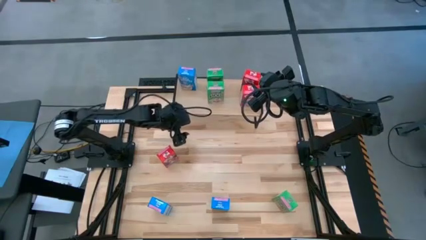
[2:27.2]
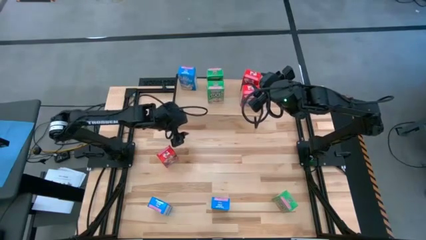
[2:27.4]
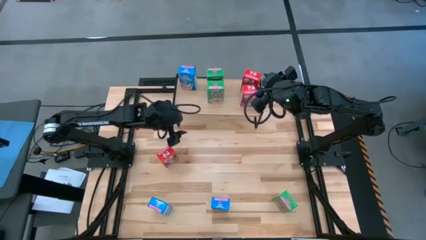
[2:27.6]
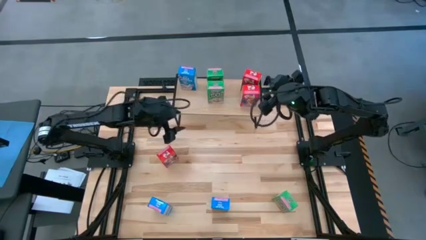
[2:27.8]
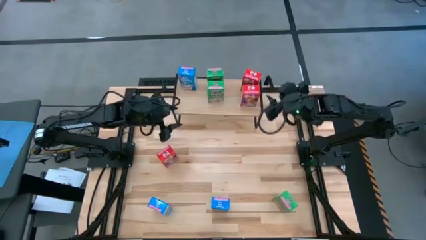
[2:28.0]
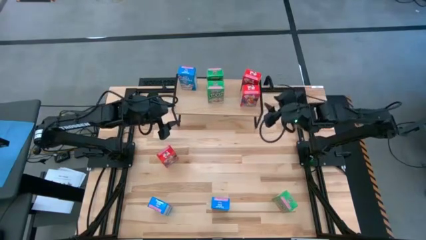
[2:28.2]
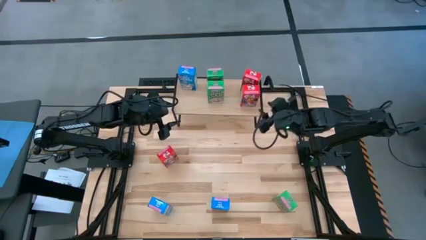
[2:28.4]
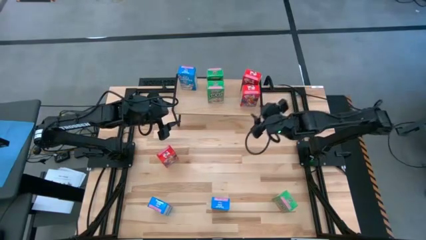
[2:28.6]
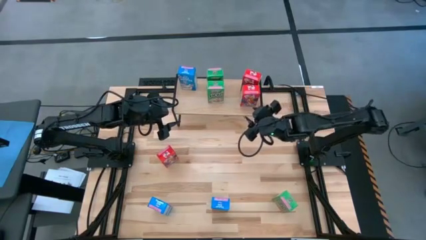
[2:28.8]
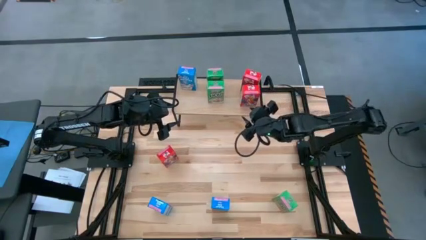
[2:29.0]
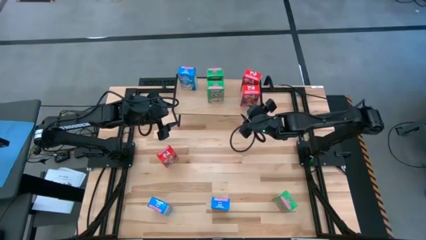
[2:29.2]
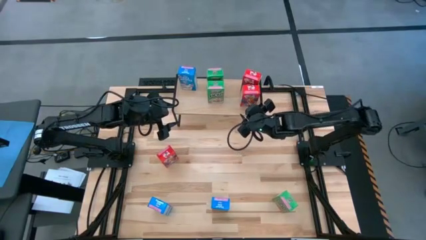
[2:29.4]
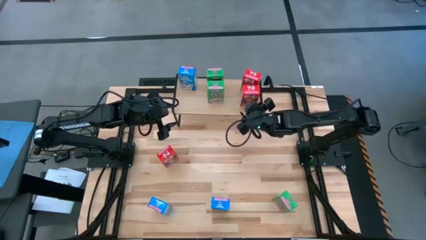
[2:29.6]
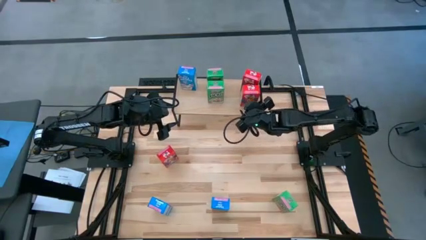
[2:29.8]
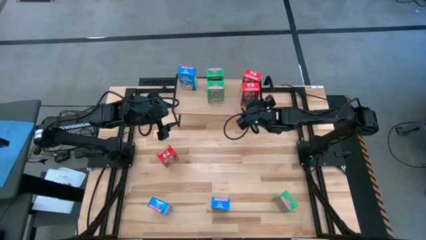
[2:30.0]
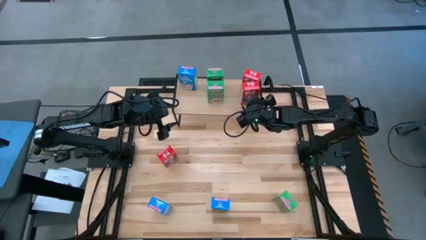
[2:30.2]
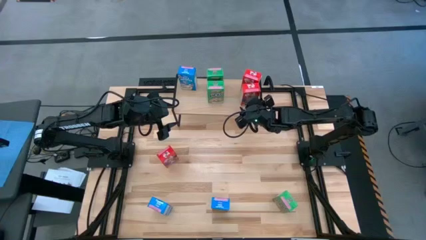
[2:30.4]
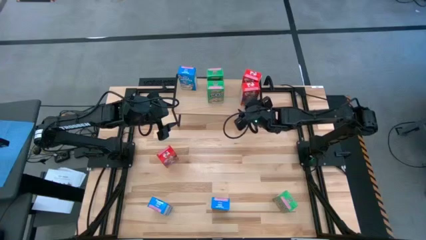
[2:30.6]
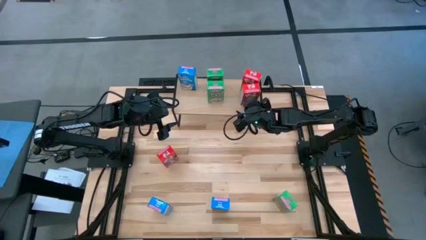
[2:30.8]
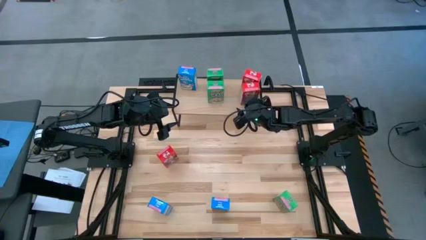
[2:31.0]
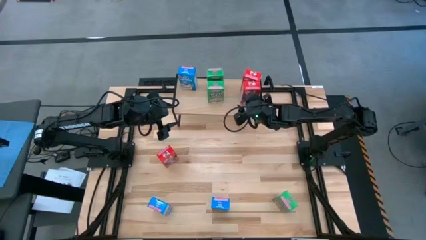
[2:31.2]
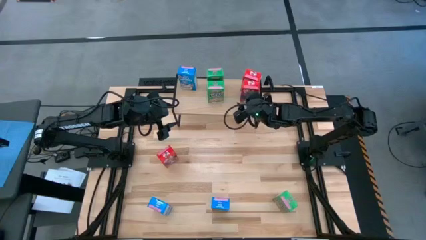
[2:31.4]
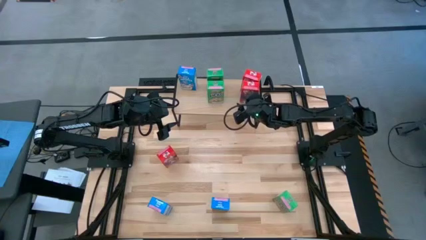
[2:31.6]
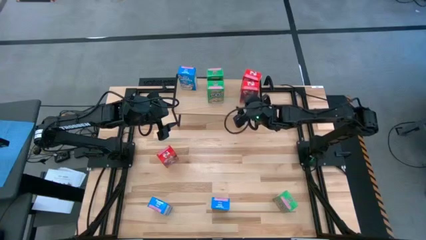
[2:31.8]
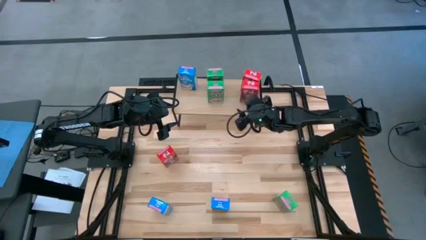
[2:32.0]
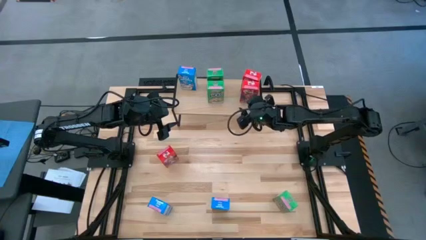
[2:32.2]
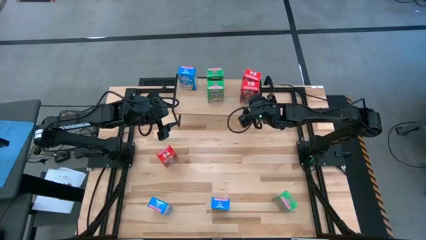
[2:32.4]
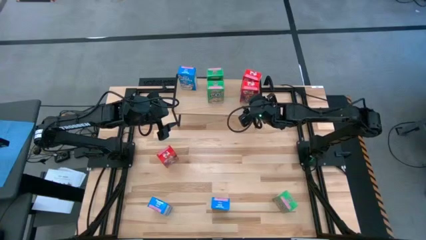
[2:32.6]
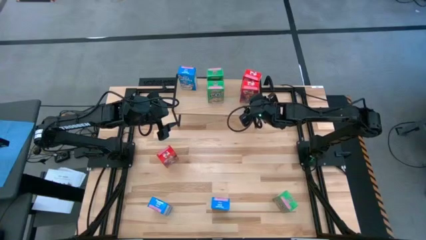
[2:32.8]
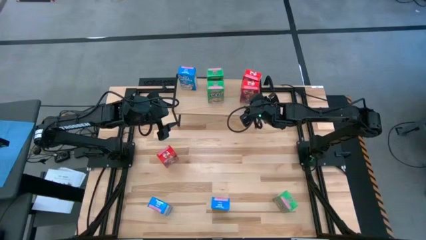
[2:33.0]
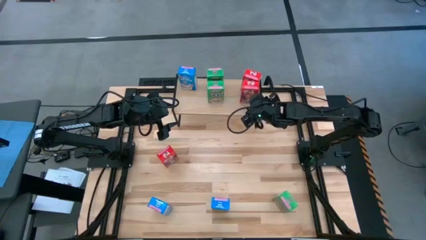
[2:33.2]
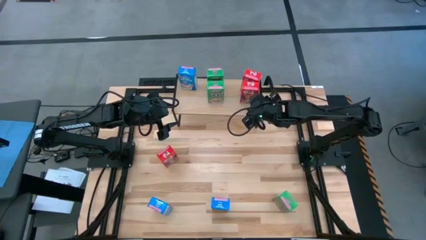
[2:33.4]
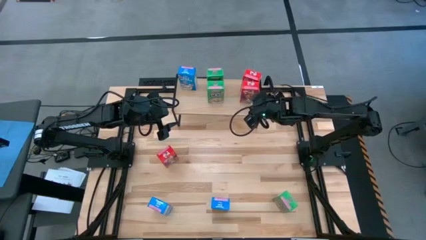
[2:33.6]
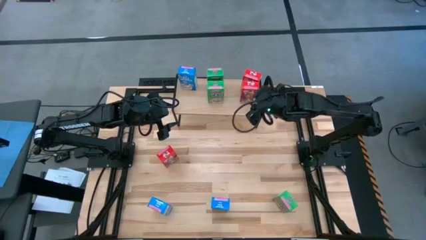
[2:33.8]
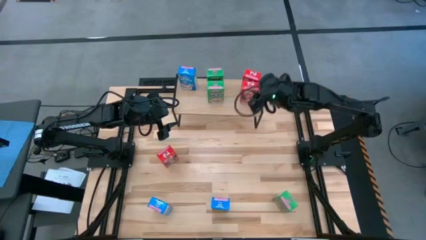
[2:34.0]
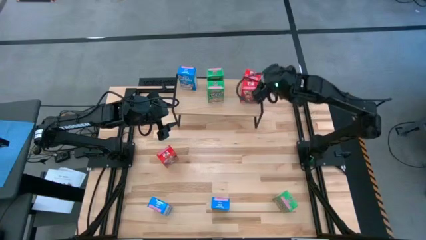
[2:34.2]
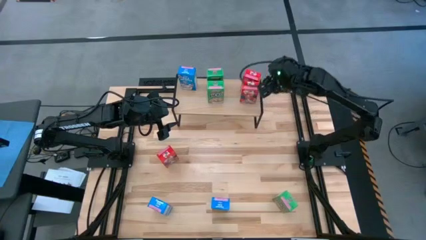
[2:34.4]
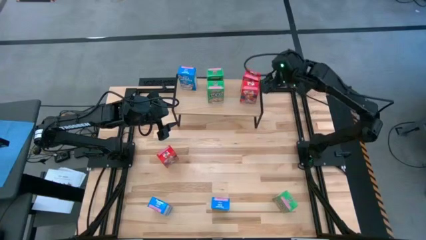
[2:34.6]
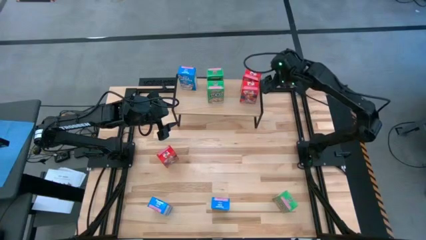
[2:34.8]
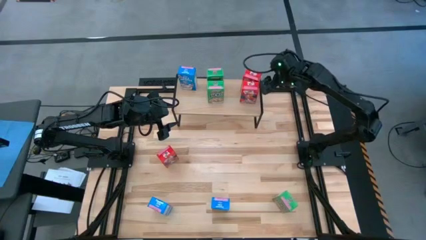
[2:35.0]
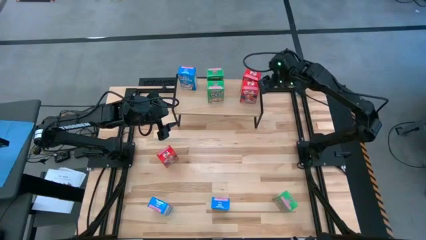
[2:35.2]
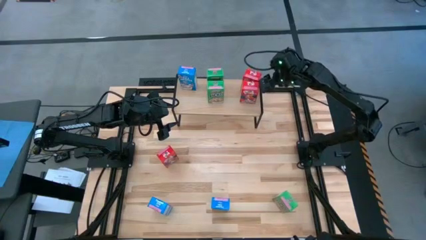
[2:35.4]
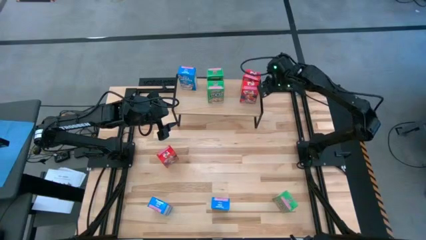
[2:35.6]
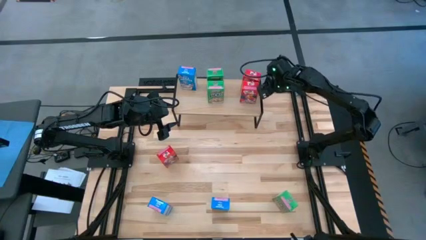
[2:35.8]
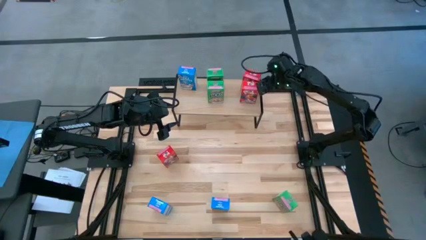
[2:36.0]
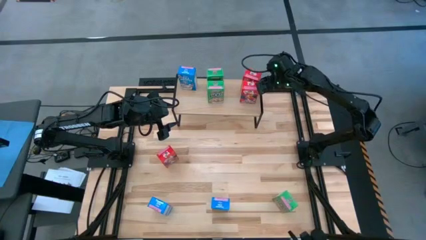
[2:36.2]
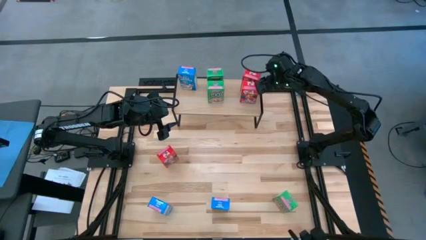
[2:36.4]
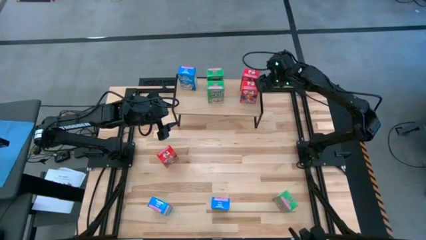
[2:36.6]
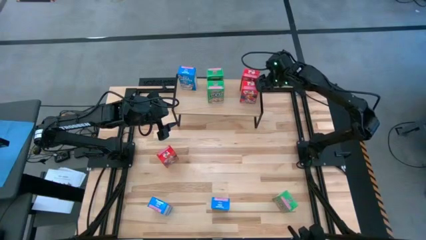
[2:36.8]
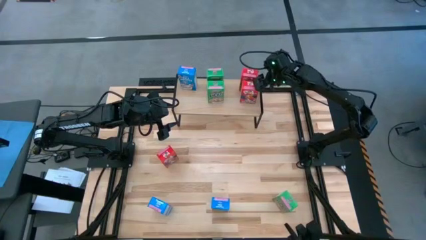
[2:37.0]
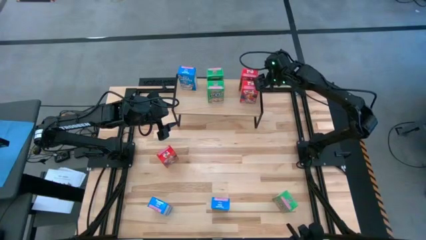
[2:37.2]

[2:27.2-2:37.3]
Task: Stack cereal on shelf
Adjust the red cereal boxes on the shelf

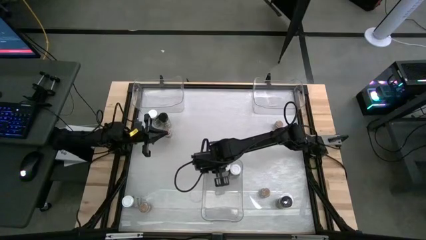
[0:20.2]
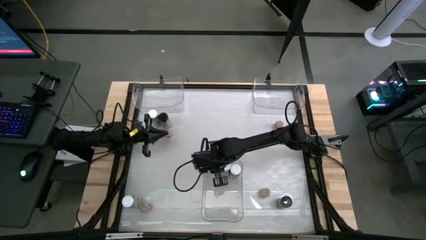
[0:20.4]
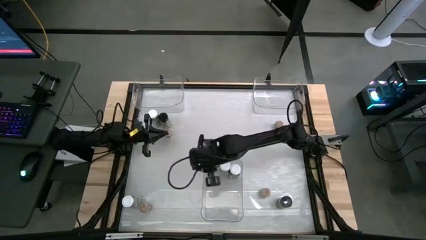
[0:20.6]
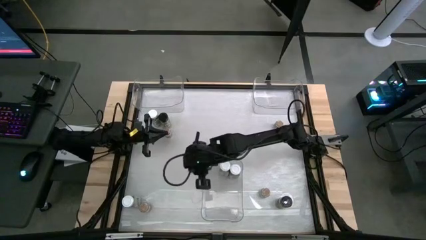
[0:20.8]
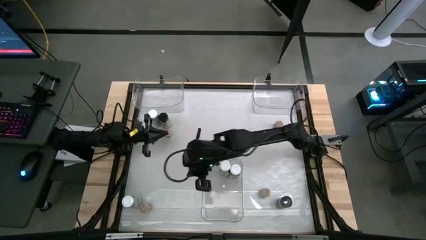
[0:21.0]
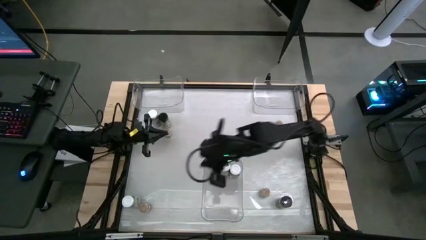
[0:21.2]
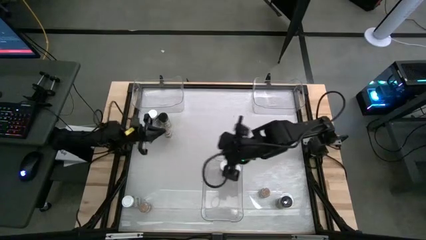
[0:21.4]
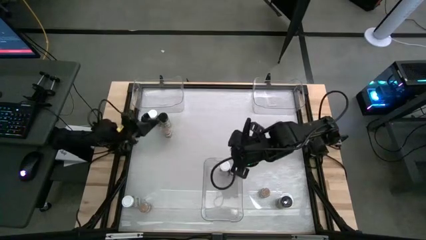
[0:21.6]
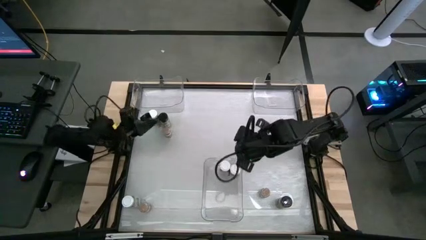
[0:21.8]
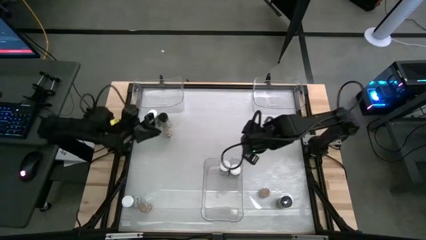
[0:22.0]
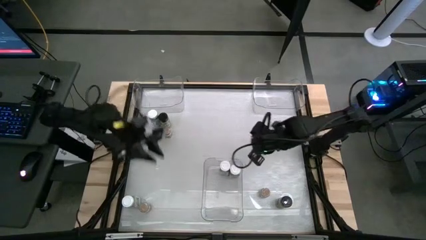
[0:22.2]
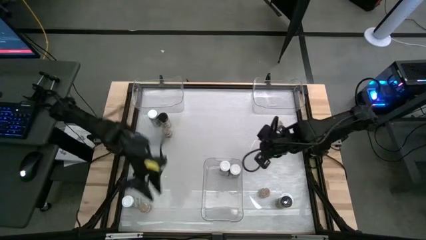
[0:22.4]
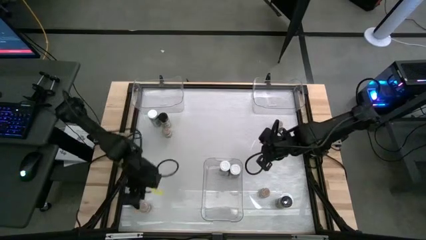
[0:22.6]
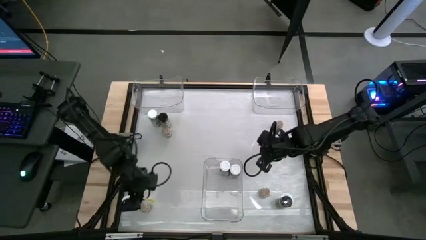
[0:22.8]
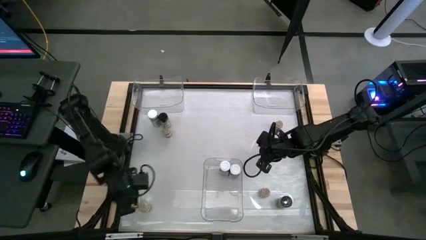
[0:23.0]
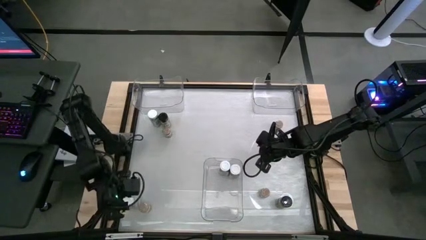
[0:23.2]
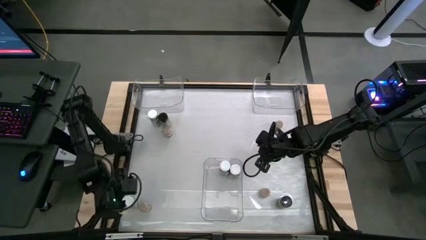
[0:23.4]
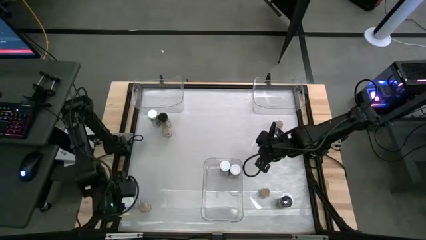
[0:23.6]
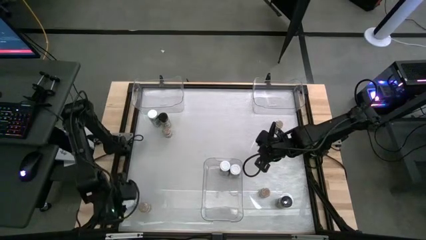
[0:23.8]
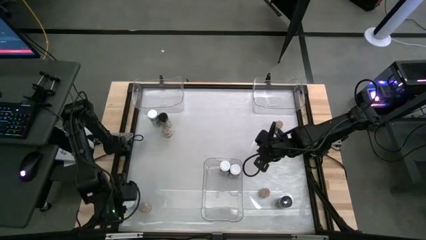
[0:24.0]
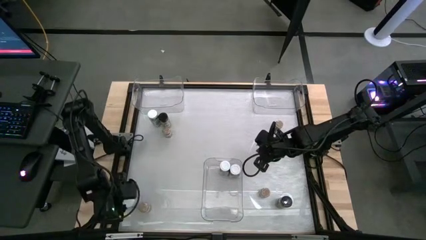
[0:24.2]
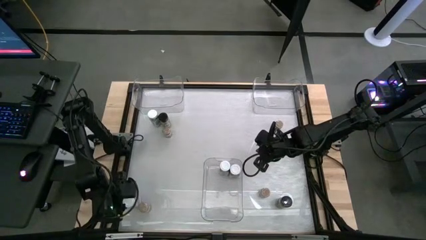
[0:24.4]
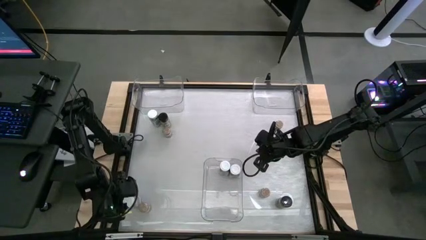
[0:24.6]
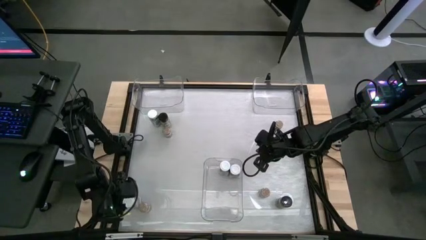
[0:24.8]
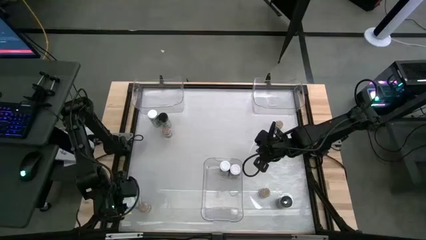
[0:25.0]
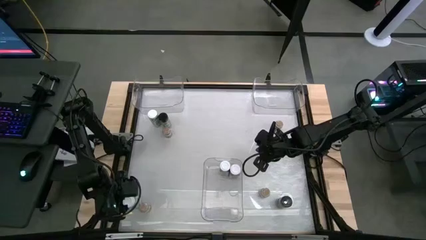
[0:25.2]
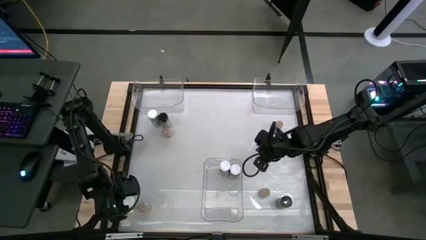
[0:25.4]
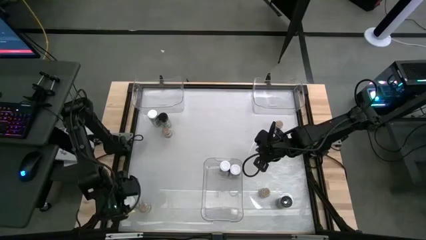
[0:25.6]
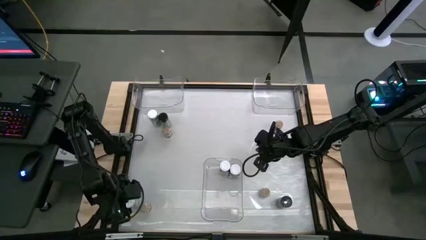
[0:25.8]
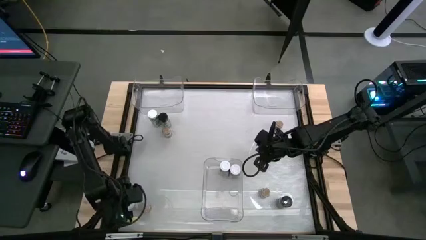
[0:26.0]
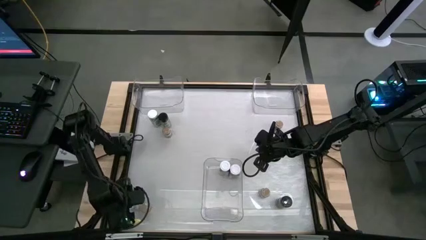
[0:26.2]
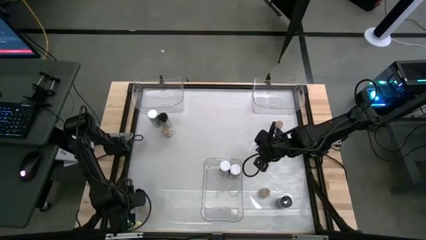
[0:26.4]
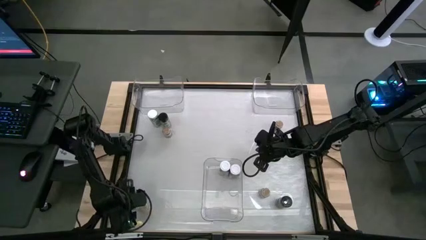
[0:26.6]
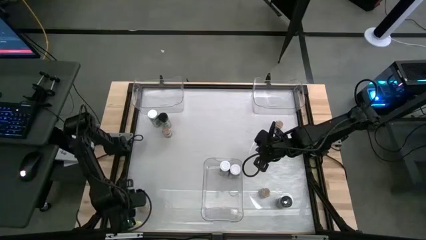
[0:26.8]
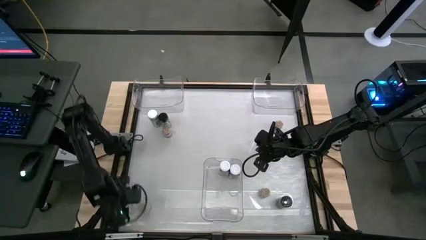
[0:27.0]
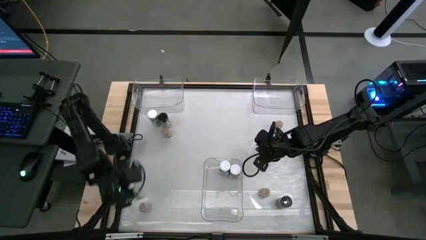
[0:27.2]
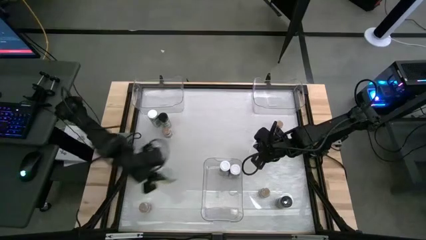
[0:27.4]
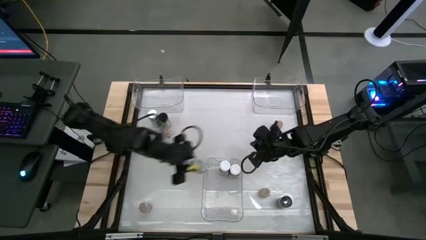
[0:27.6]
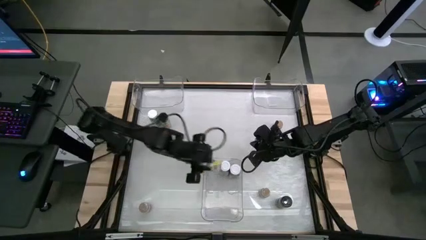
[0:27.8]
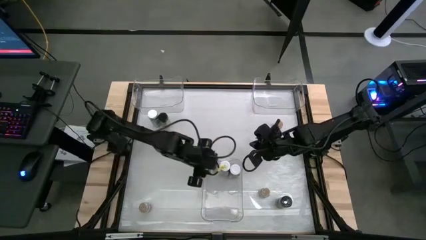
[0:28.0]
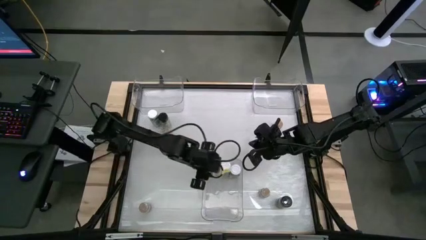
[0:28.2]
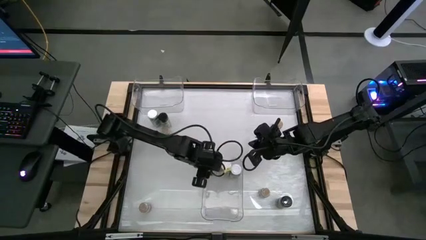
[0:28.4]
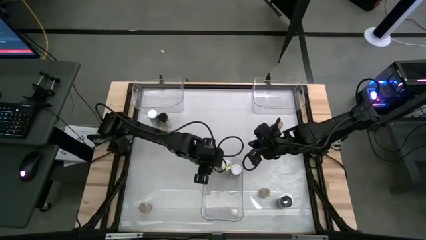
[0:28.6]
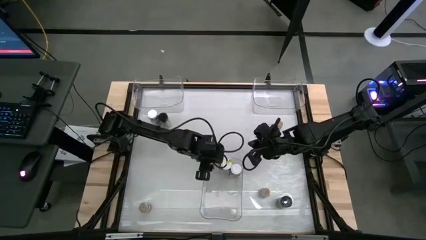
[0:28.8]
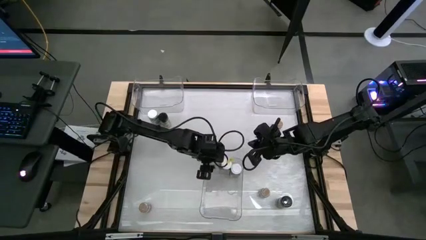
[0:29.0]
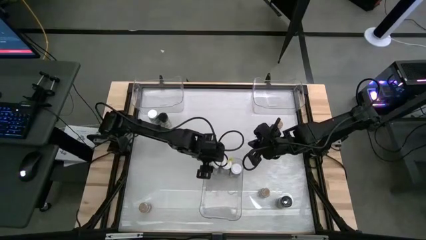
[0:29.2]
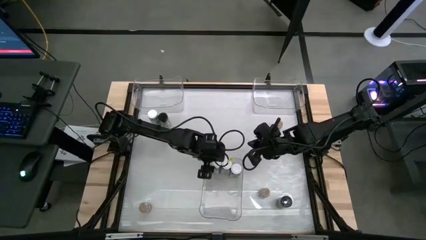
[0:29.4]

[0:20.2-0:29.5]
Task: Sort spices by type
Put the bottom white seasoning bottle into the bottom transparent bin
